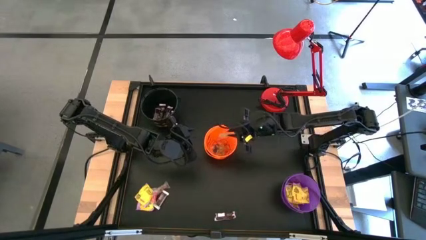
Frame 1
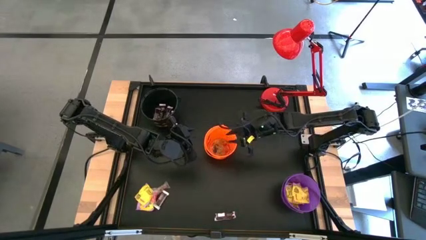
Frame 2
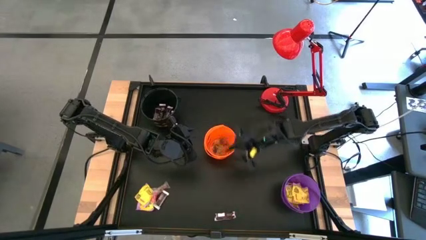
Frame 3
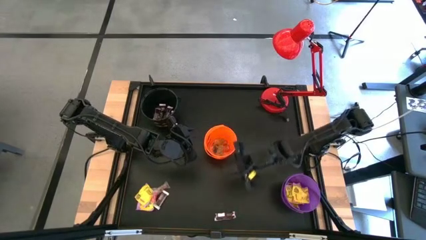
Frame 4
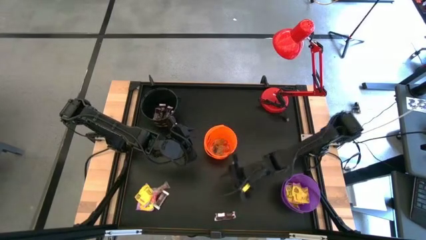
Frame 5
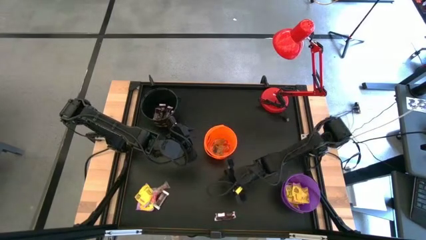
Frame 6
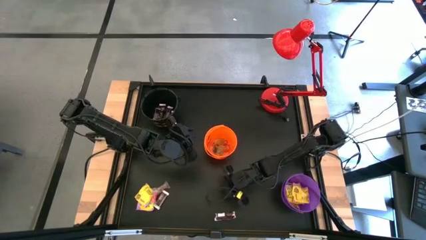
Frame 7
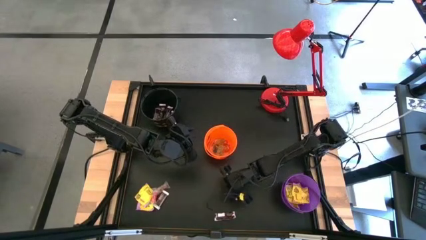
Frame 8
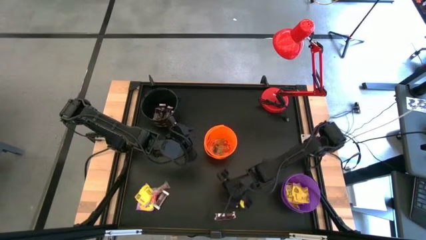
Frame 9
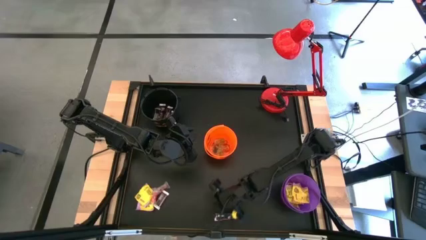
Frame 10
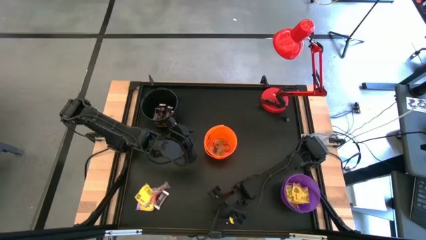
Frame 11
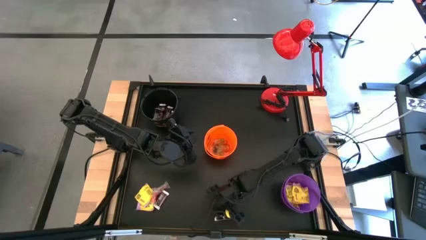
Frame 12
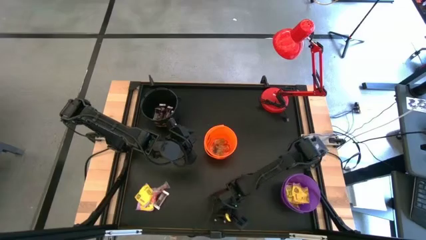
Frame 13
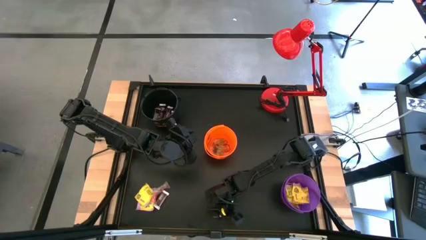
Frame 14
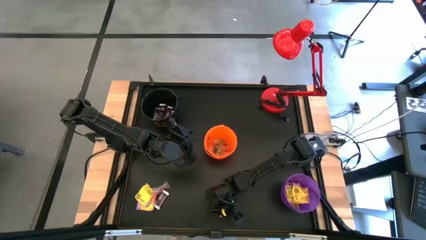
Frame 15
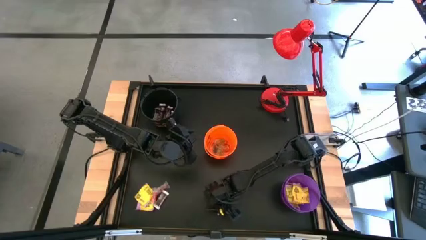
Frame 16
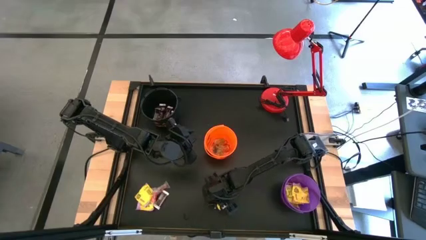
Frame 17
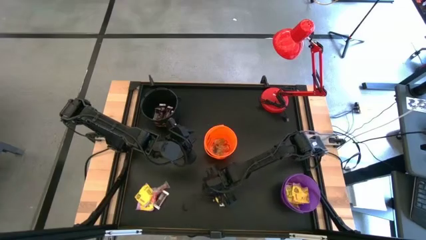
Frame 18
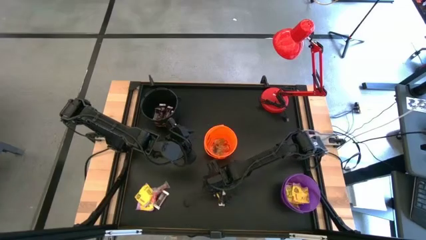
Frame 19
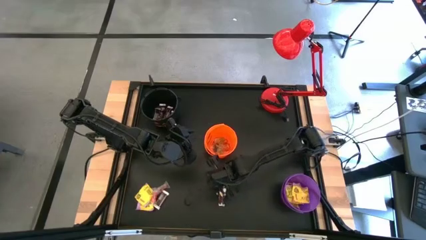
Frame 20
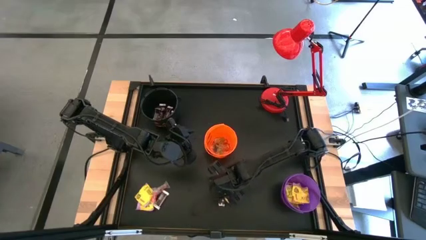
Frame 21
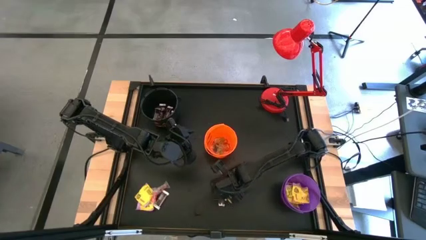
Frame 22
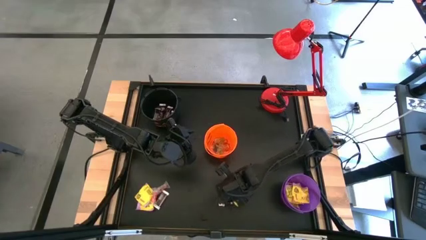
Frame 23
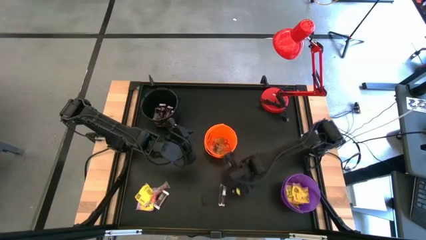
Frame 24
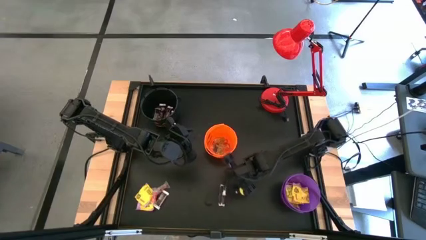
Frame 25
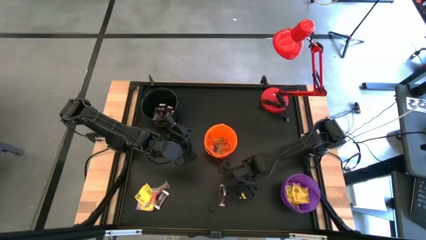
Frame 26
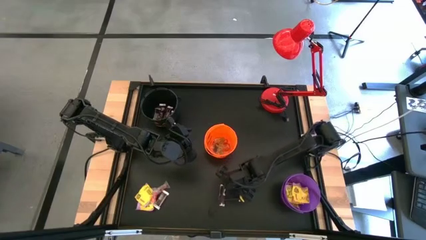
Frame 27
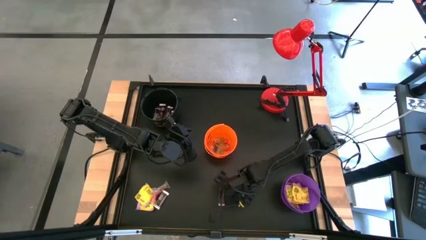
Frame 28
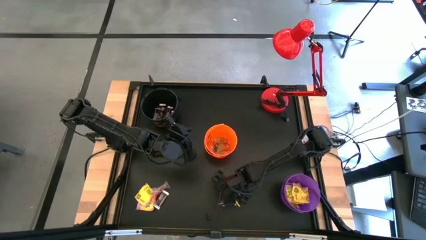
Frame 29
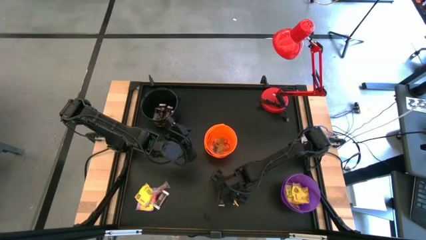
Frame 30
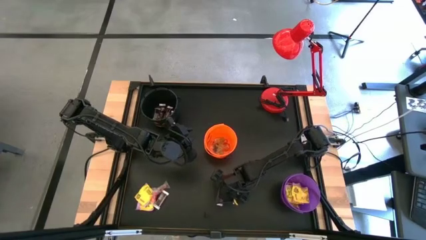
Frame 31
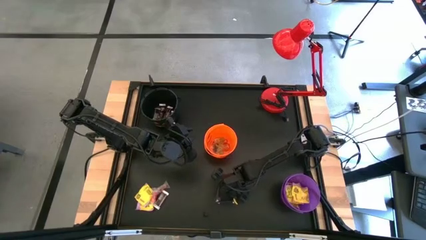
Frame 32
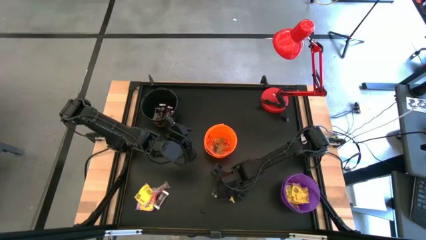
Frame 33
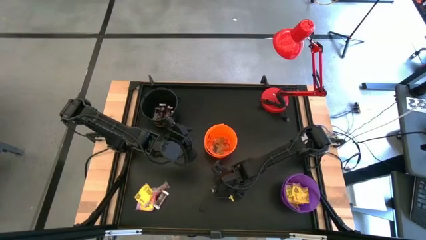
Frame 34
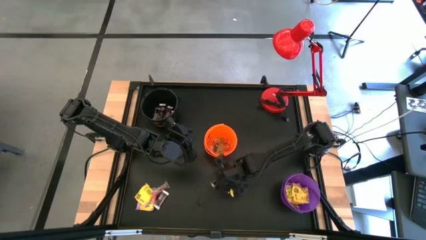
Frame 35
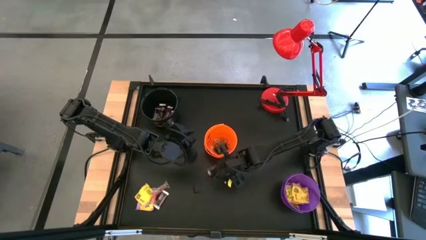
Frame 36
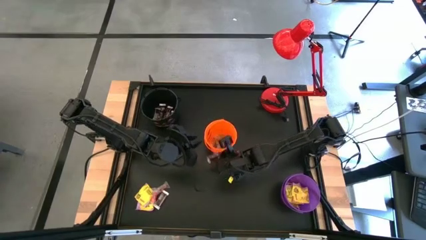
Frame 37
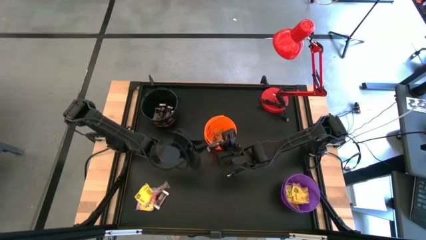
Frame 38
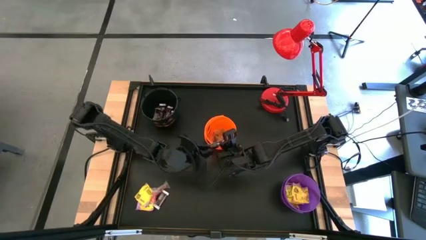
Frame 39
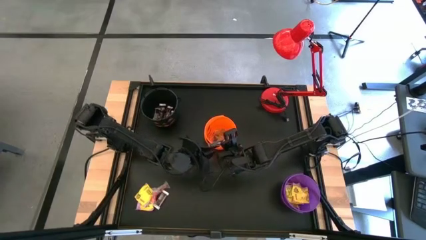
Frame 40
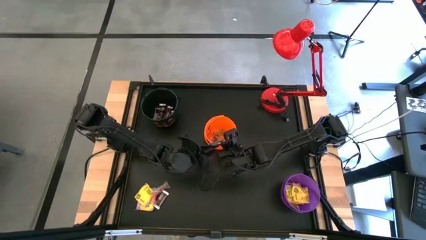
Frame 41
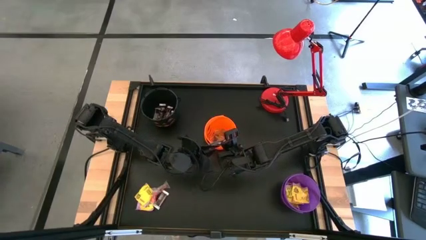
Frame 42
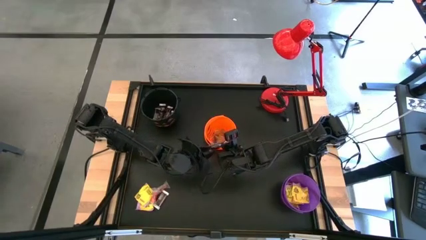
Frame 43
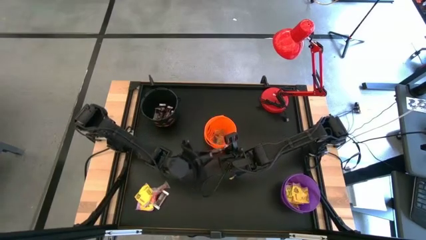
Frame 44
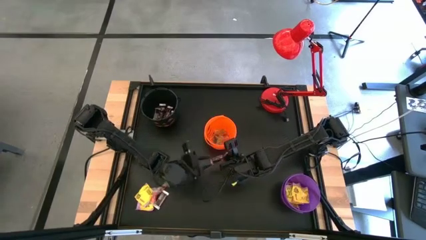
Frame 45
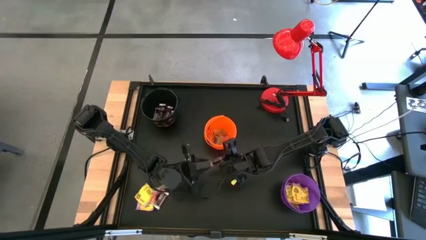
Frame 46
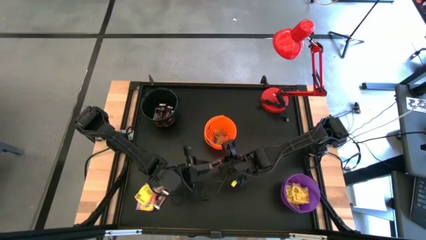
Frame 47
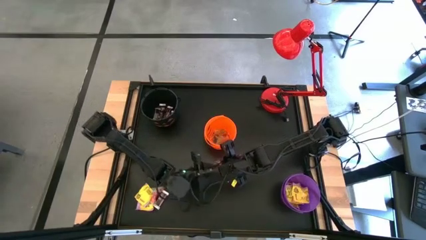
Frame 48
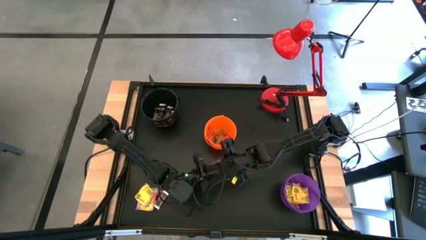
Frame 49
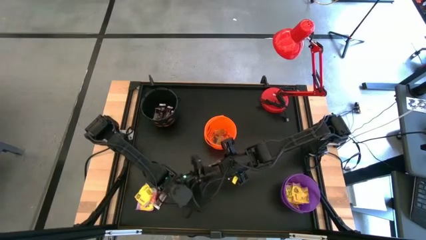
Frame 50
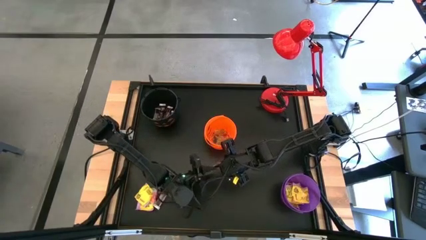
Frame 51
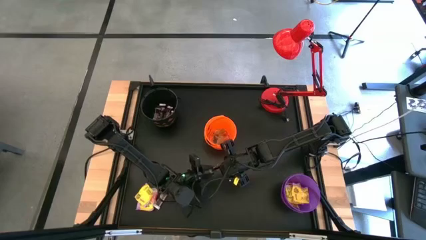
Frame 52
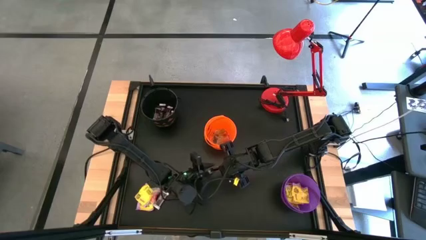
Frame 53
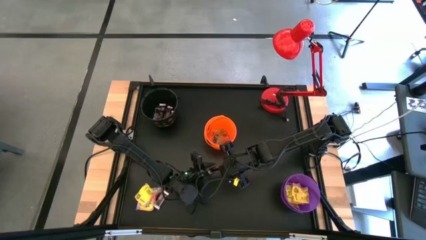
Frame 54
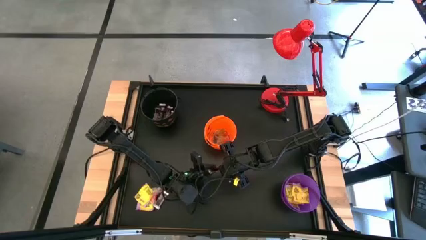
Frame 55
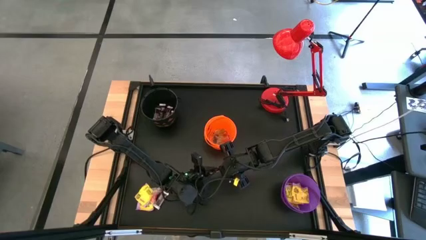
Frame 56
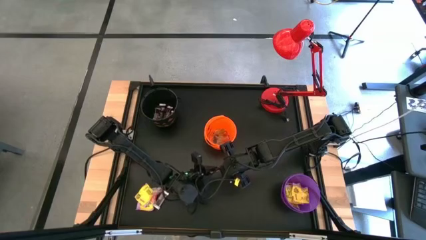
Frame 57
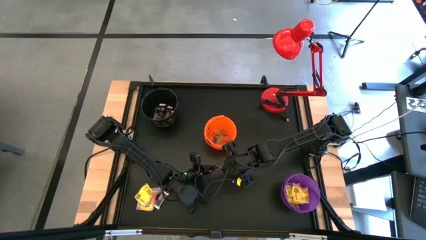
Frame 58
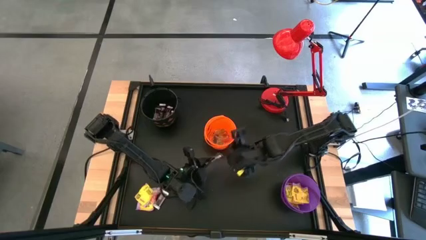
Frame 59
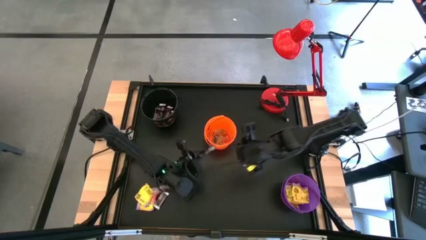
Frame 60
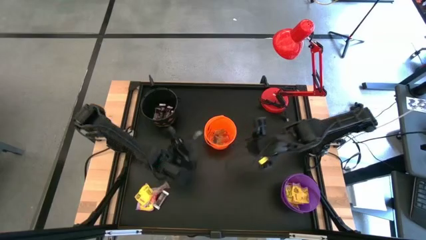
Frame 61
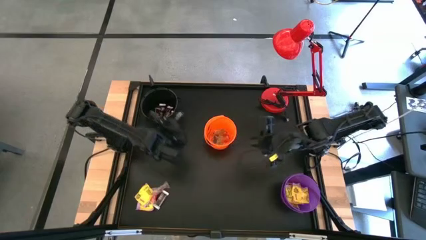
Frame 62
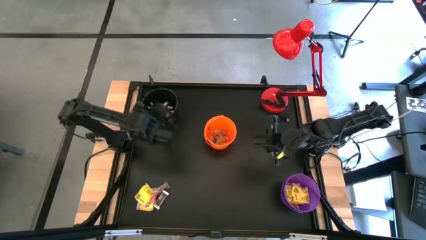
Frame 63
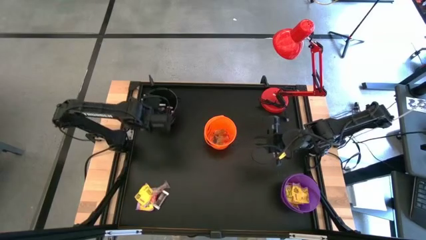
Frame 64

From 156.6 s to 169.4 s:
Task: Sort candy
Put the brown chocolate bar into the black bucket

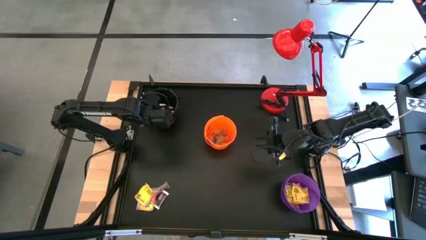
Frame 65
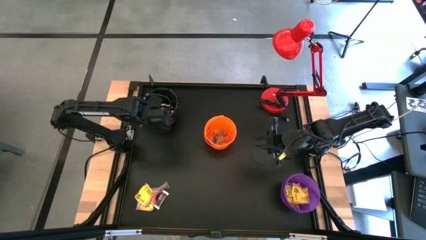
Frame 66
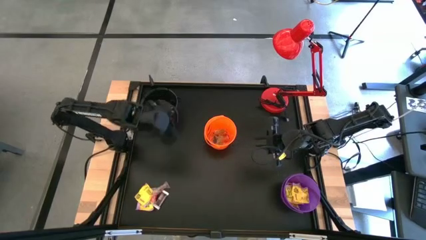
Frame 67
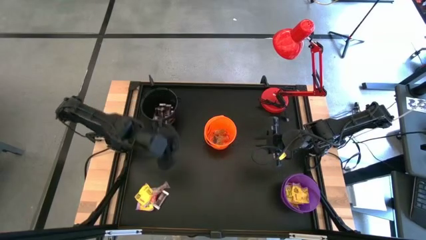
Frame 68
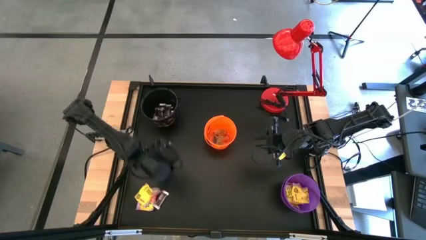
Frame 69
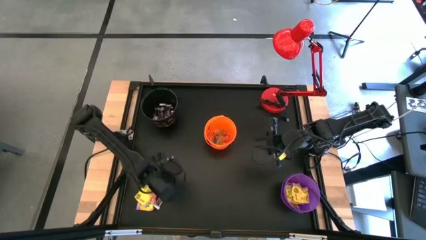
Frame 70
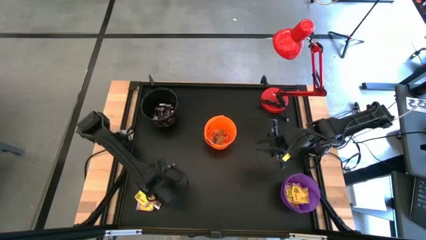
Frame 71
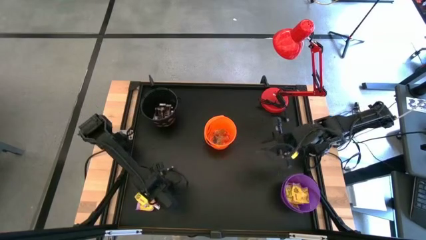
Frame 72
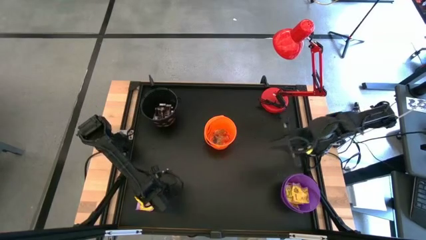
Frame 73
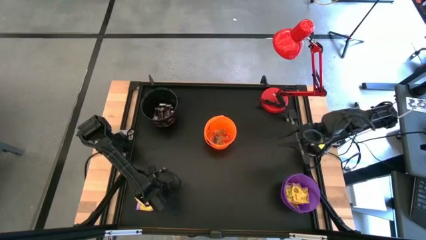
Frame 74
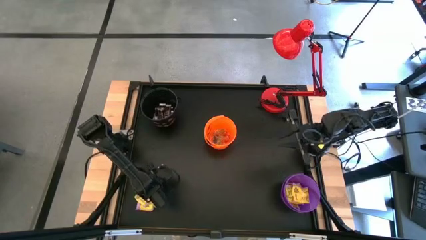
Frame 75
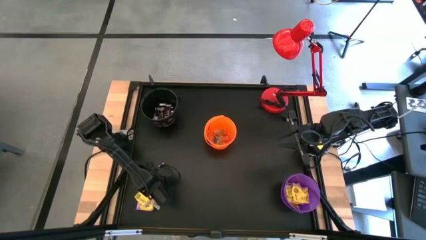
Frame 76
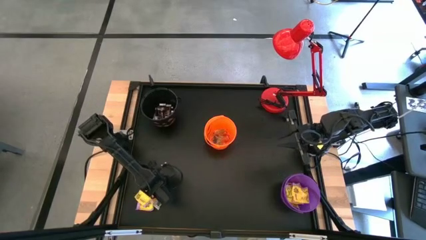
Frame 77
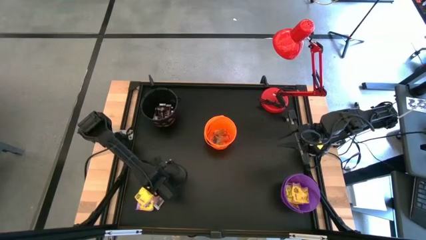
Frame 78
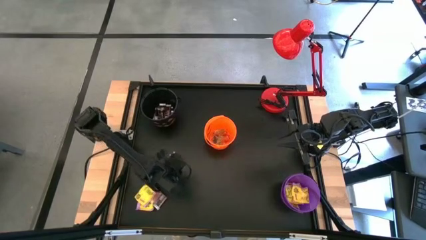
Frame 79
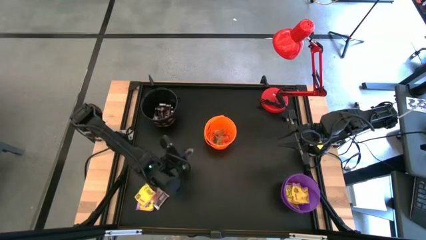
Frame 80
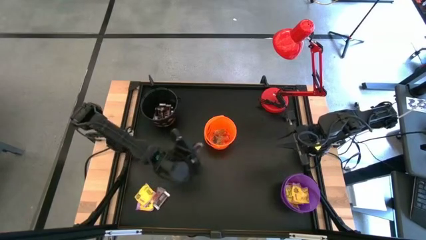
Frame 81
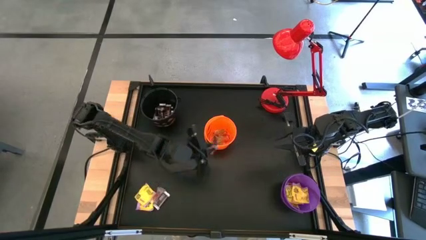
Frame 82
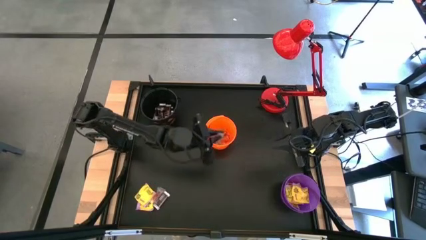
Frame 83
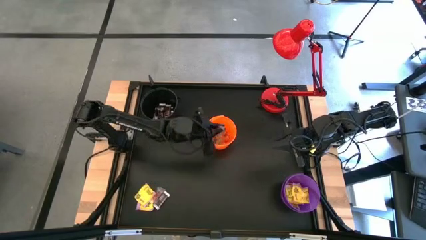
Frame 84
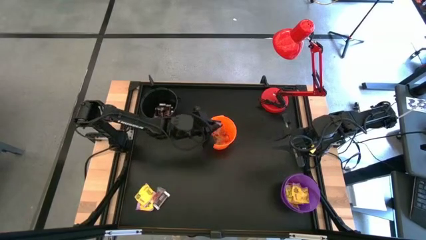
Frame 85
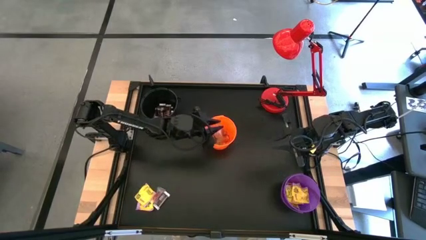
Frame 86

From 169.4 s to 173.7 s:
Put the orange gummy into the orange bucket
